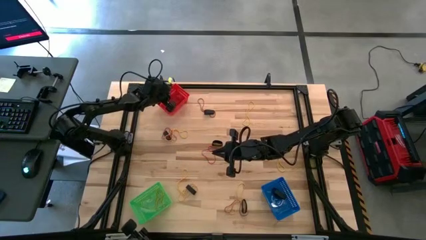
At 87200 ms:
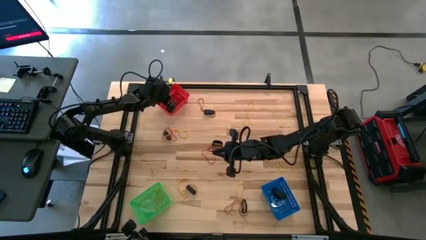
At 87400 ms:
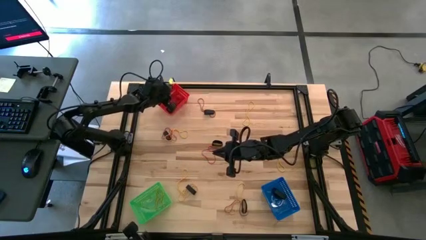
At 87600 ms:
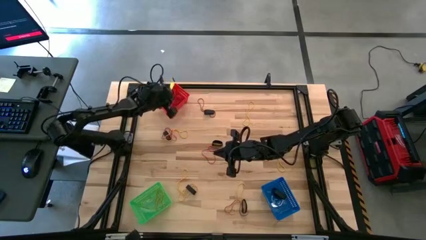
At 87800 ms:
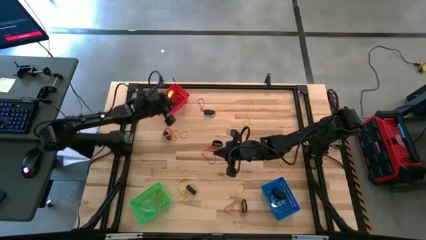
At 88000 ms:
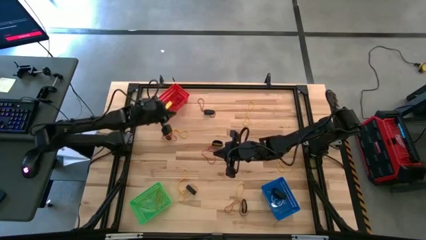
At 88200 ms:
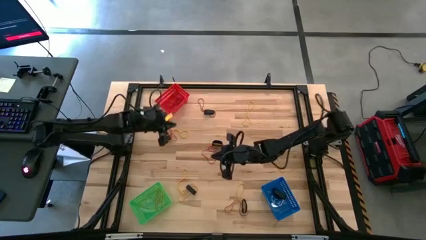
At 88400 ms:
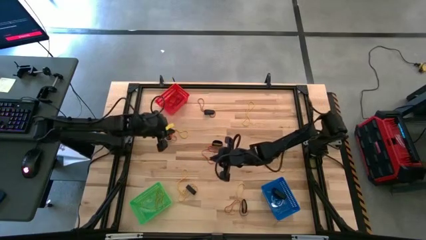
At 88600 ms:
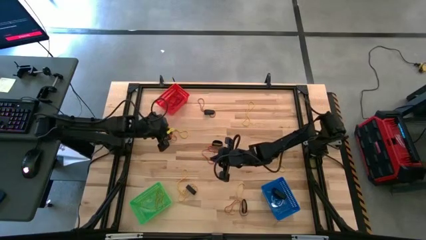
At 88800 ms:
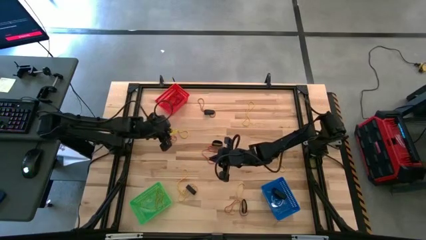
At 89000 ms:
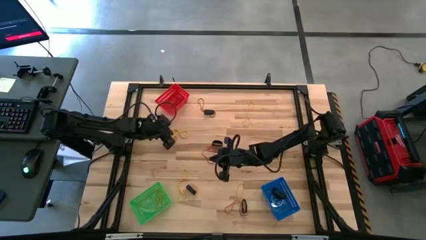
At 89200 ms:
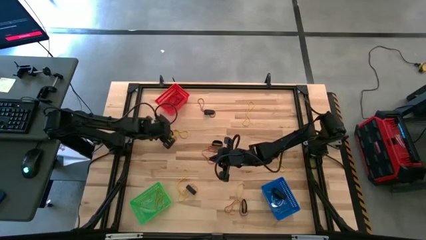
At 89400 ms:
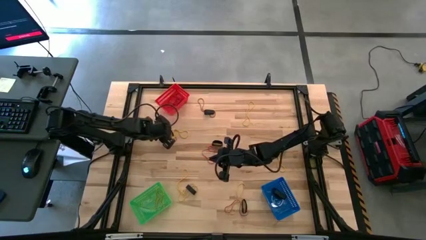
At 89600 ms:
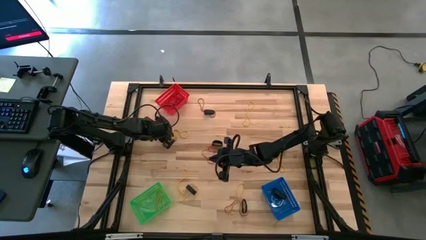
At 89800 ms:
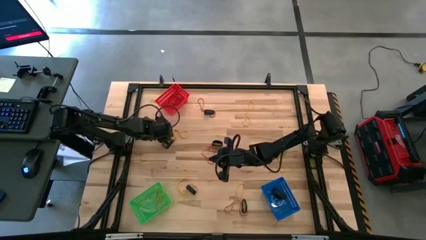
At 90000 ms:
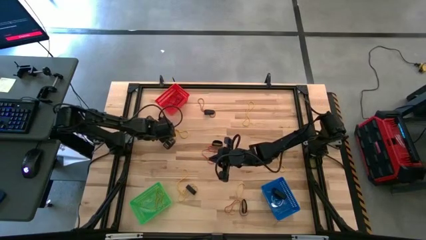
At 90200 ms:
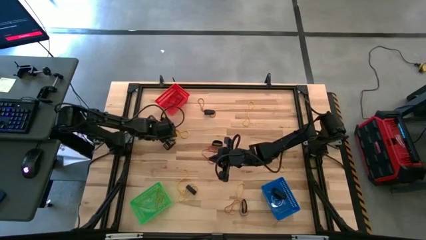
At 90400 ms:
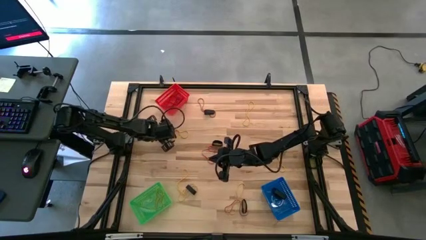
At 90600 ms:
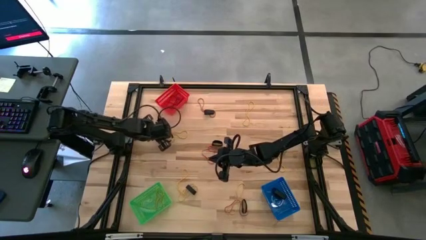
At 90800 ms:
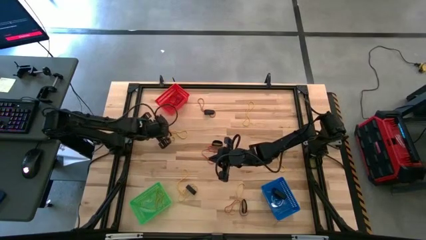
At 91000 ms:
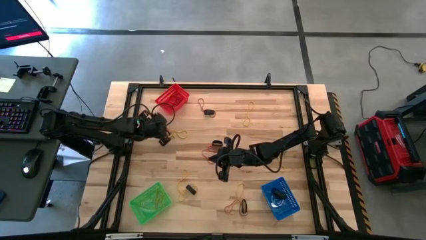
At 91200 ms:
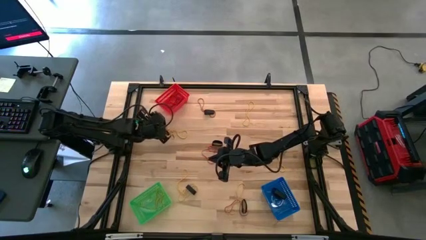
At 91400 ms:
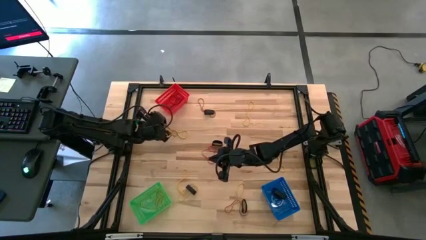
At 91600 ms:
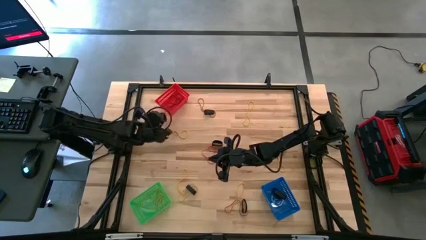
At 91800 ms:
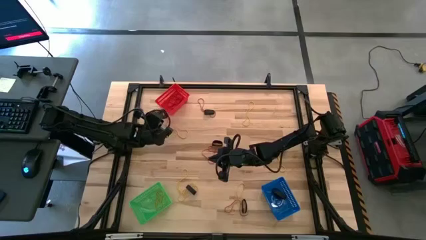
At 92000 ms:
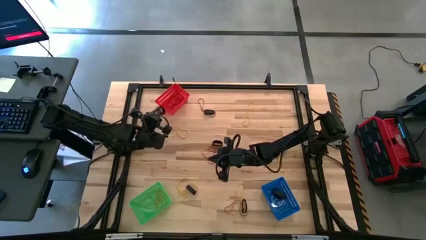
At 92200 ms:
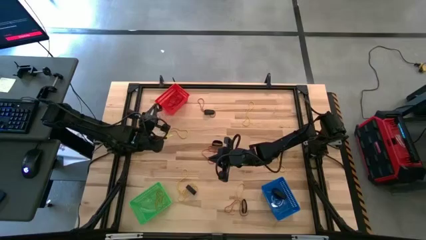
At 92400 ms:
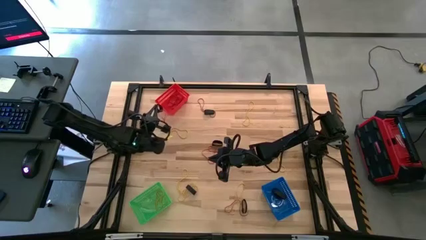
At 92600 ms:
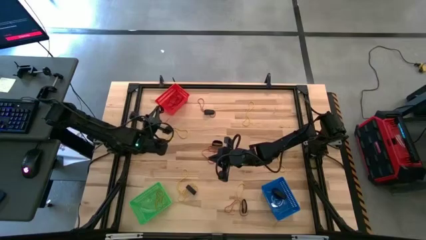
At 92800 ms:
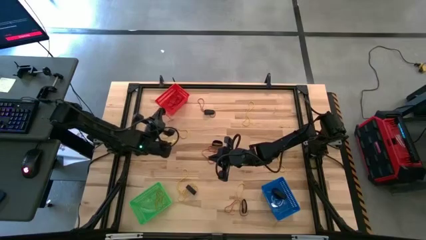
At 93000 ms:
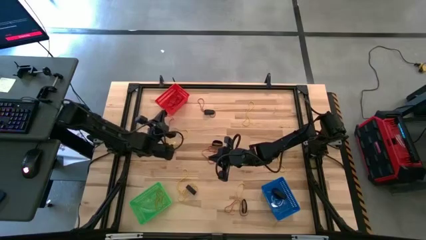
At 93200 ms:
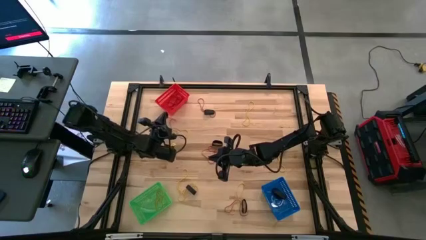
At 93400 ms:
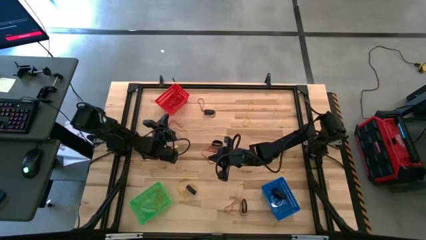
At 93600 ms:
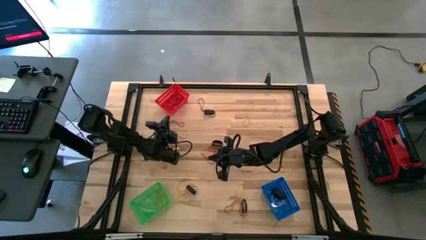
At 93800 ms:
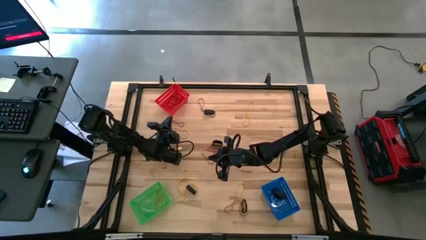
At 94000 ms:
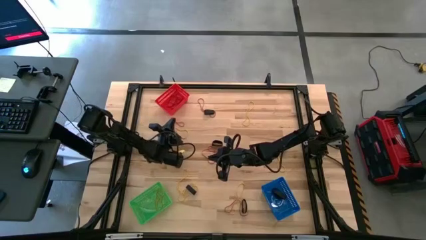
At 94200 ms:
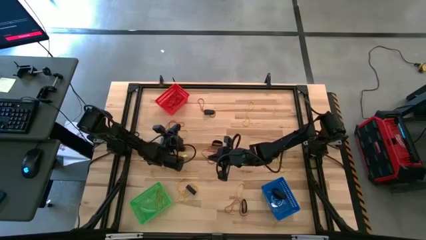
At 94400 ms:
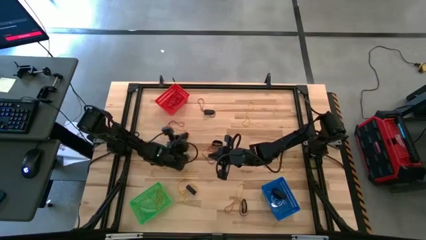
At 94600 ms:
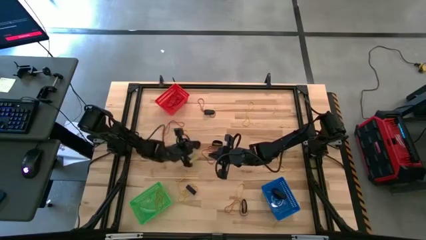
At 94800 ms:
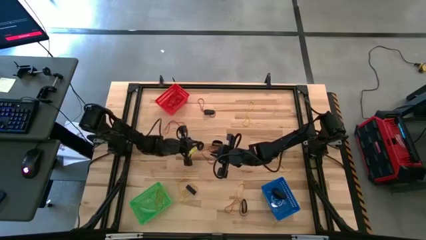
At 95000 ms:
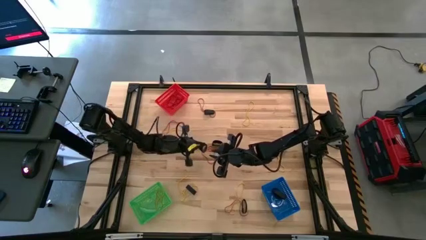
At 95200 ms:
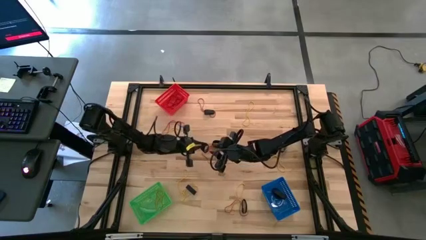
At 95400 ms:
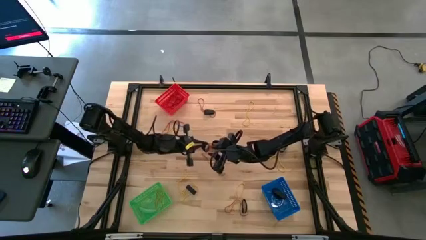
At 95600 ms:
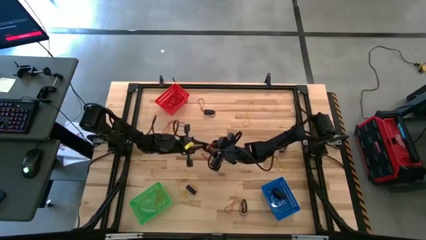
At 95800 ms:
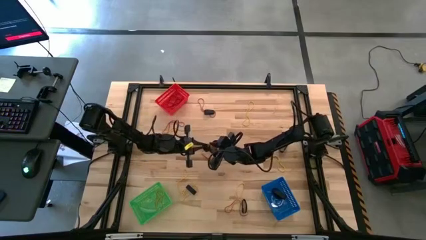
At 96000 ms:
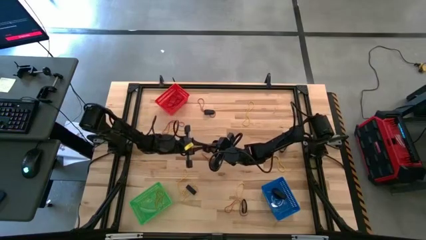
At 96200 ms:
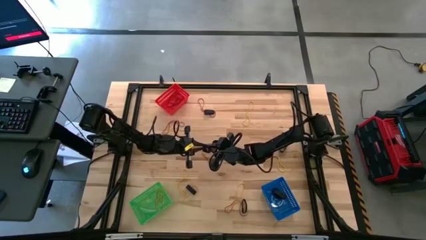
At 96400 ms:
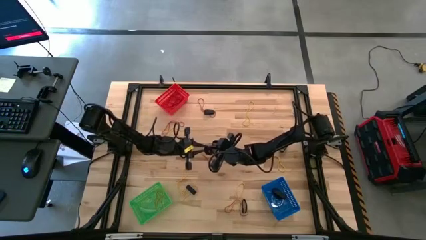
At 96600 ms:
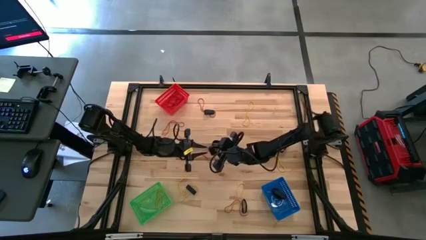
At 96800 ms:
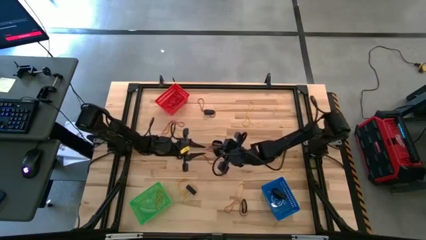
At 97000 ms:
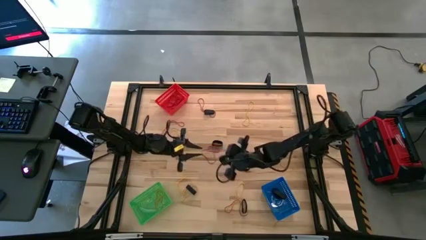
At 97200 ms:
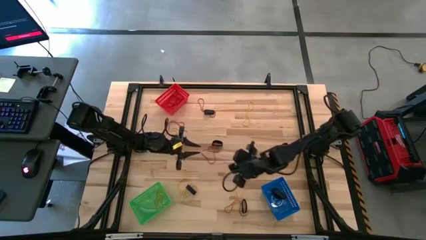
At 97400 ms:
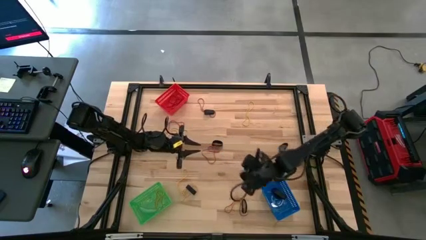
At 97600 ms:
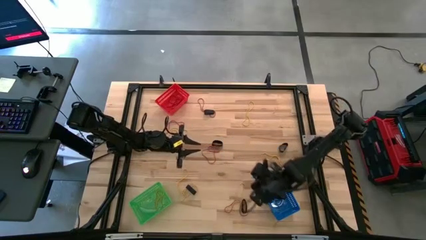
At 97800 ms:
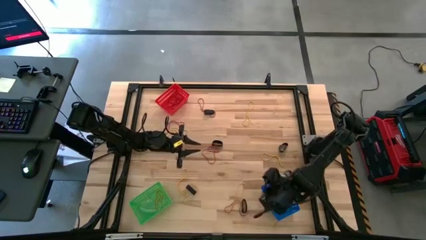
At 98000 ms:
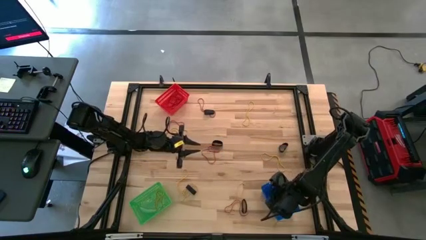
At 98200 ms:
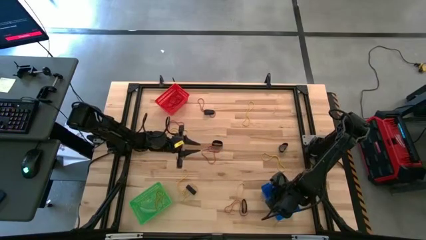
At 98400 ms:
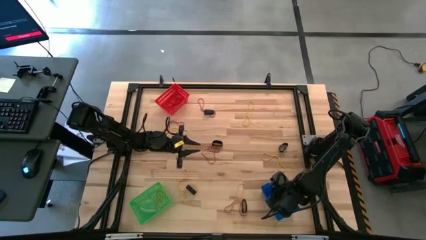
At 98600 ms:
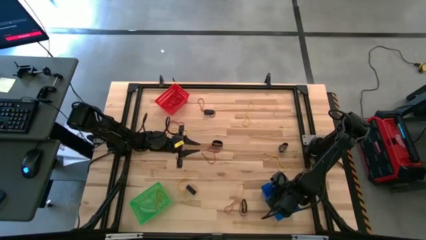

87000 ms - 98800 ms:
Task: Sort rubber bands into baskets
Put the black rubber band into the blue basket

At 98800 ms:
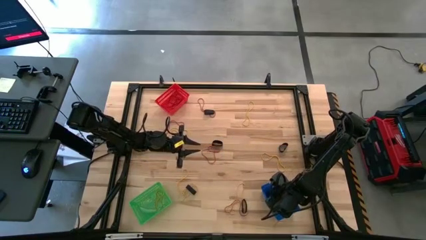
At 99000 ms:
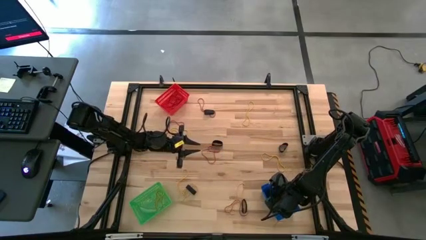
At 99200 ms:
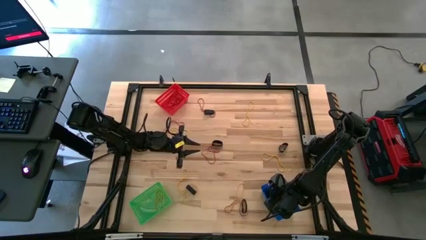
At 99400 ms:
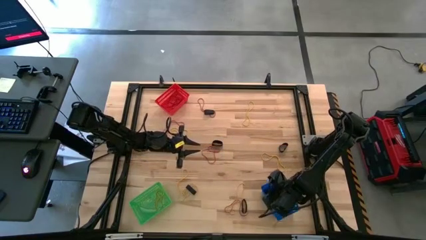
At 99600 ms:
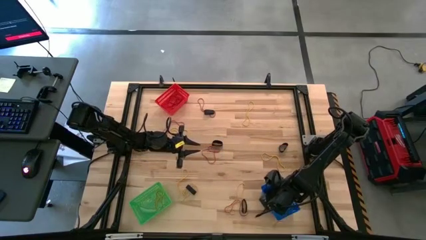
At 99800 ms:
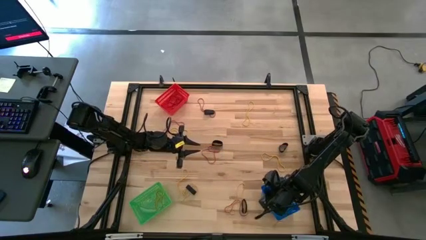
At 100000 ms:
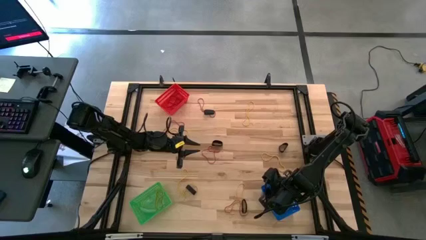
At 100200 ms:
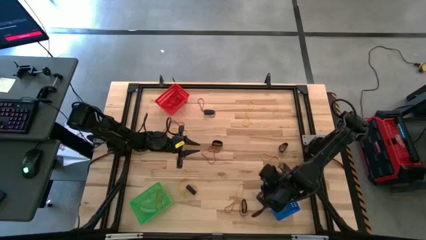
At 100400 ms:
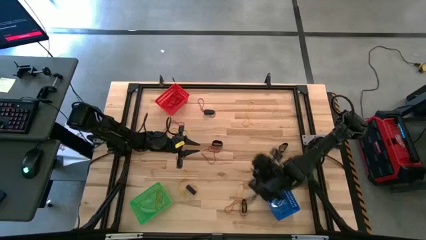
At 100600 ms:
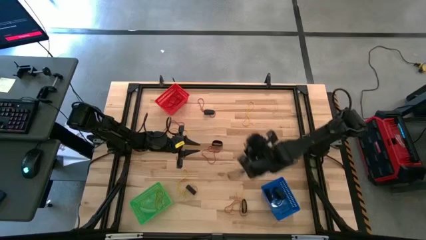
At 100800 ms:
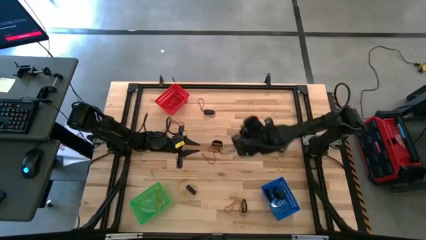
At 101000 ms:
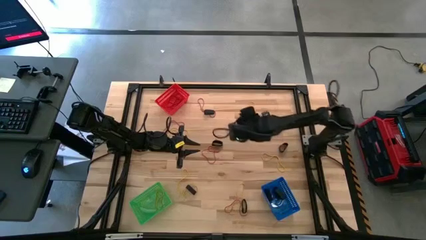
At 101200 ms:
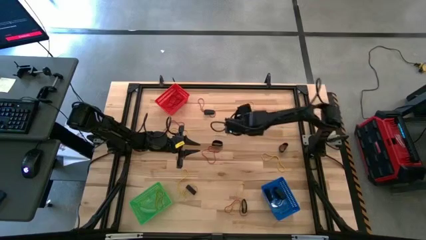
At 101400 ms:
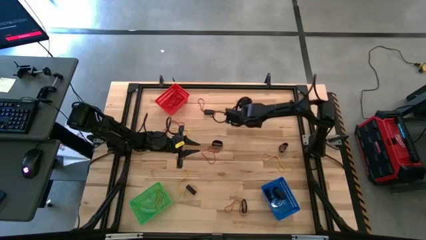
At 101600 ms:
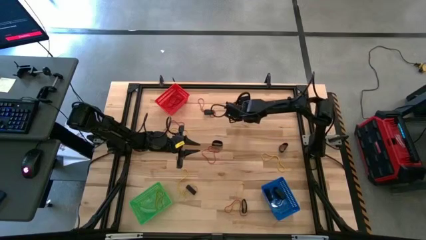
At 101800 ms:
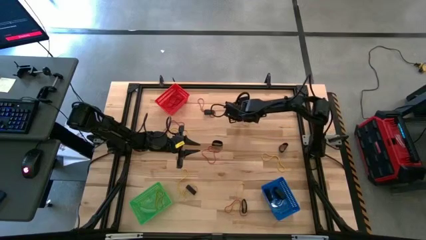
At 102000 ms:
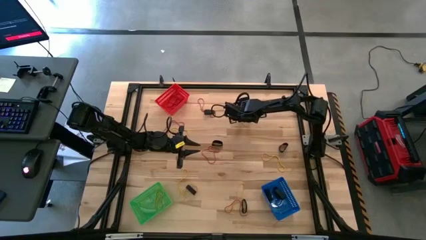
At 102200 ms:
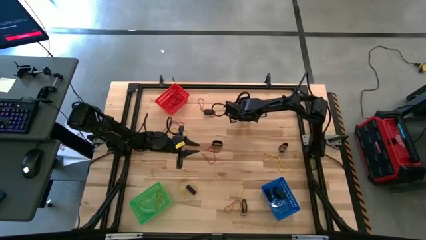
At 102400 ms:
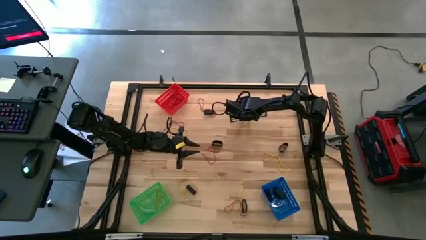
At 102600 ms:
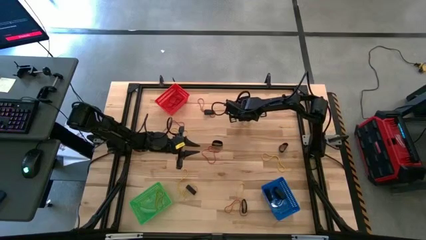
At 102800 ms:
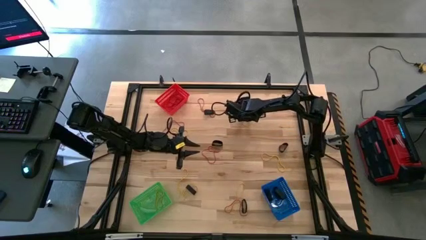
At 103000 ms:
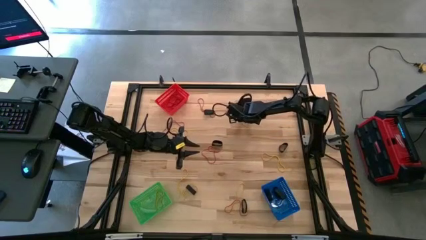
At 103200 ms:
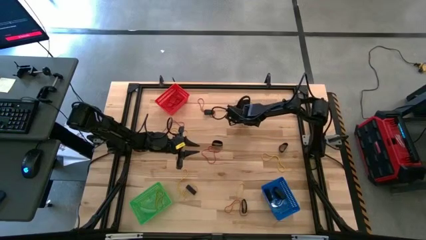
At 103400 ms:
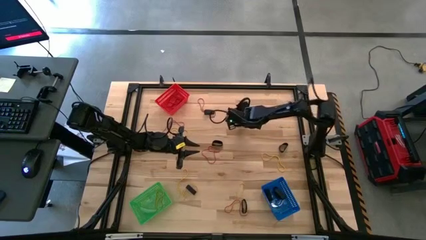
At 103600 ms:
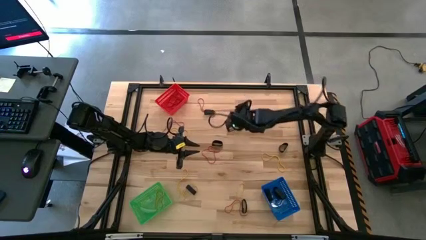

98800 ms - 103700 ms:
Put the yellow rubber band into the green basket
